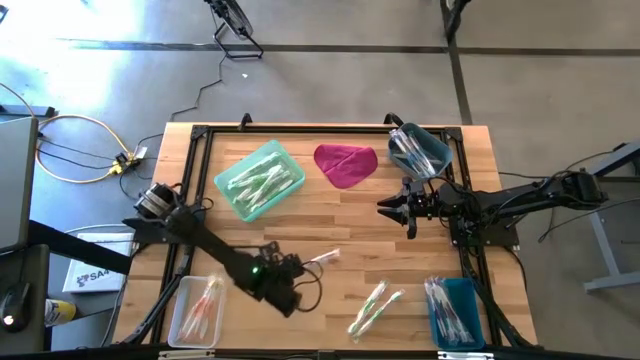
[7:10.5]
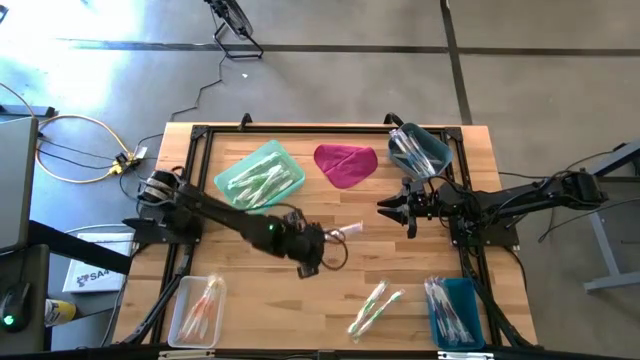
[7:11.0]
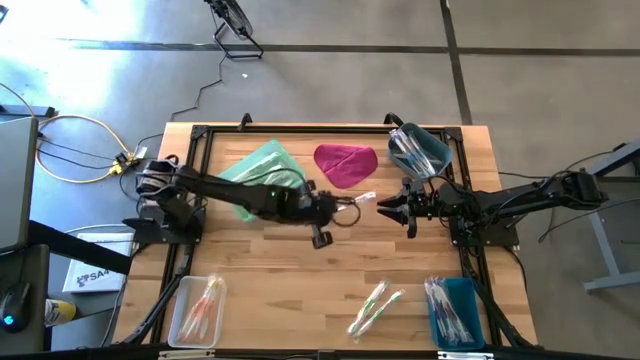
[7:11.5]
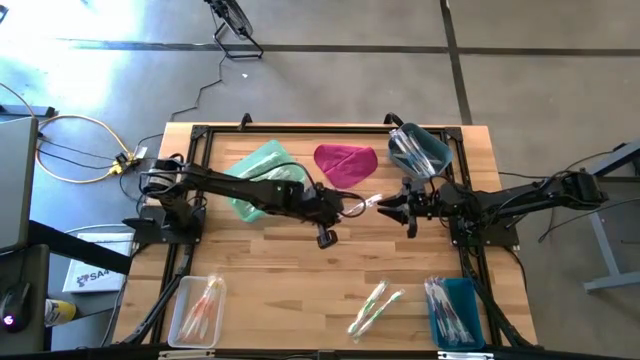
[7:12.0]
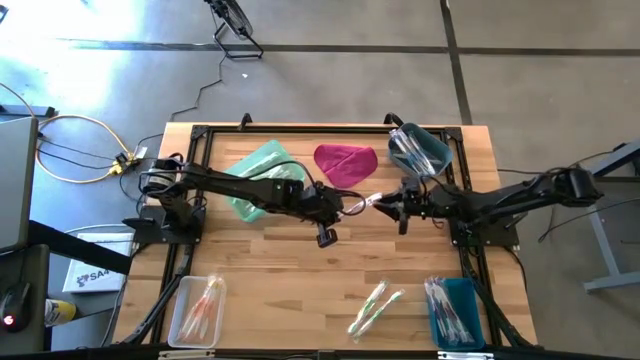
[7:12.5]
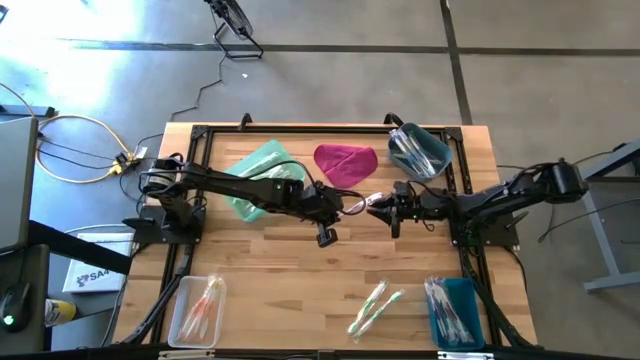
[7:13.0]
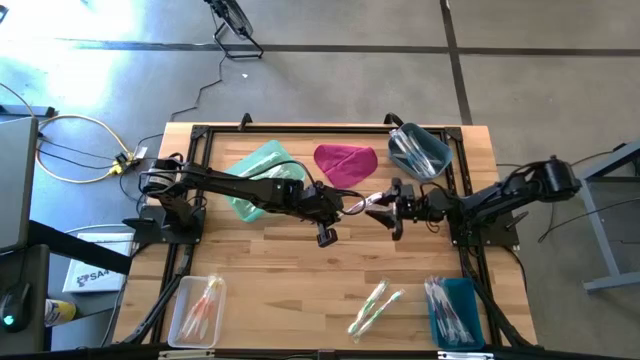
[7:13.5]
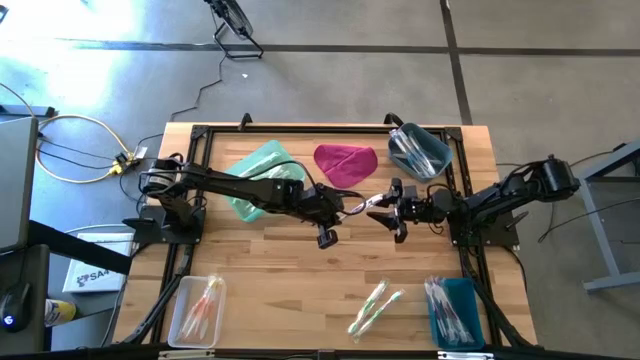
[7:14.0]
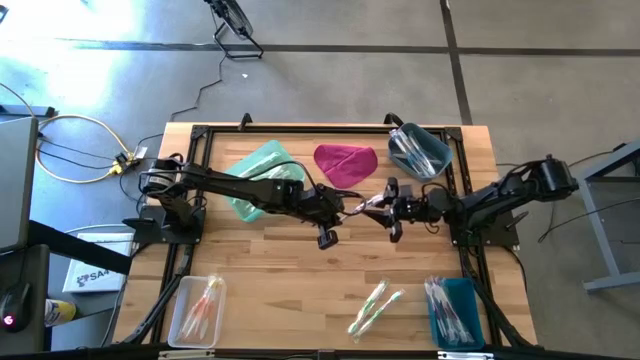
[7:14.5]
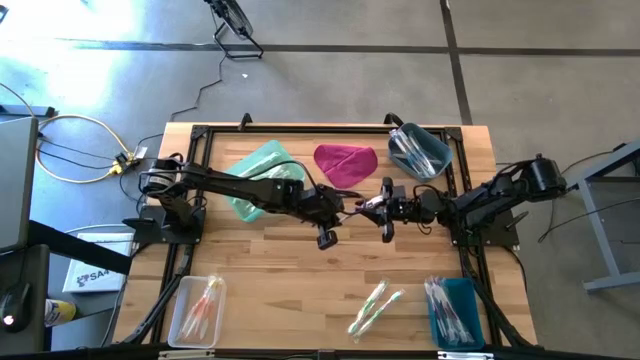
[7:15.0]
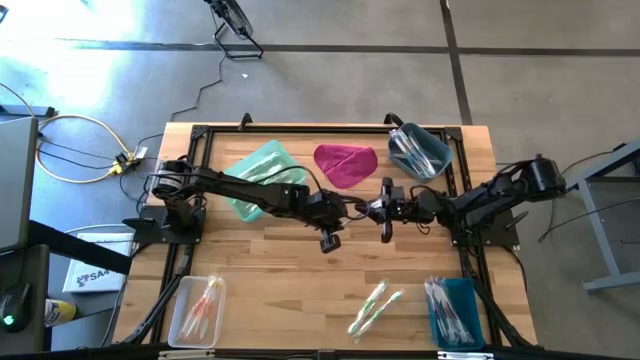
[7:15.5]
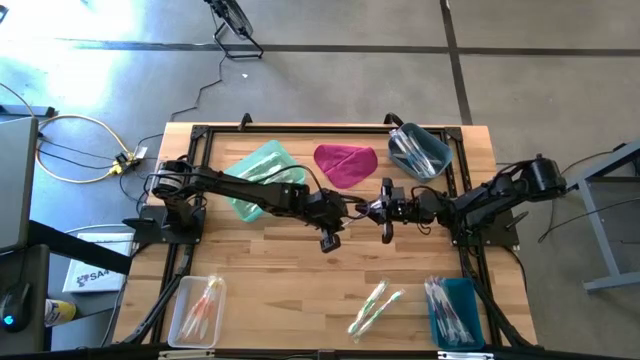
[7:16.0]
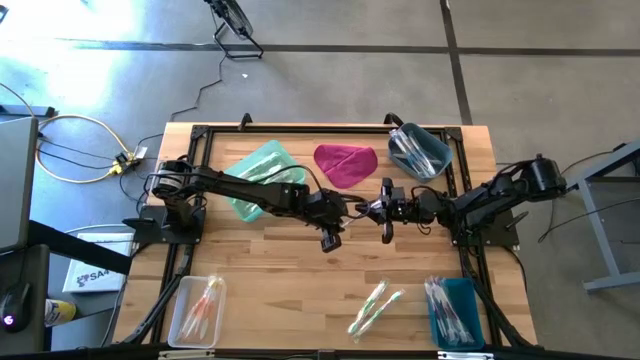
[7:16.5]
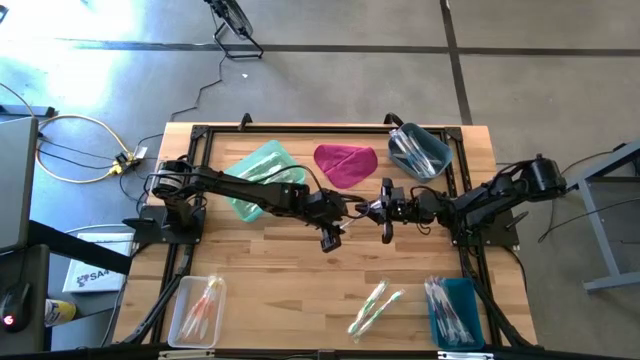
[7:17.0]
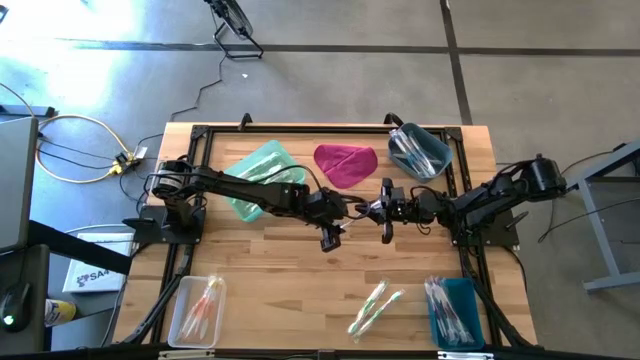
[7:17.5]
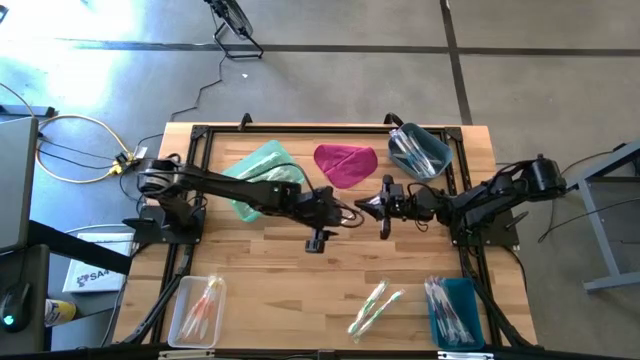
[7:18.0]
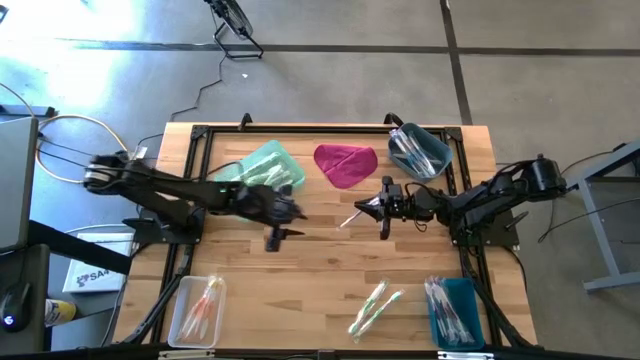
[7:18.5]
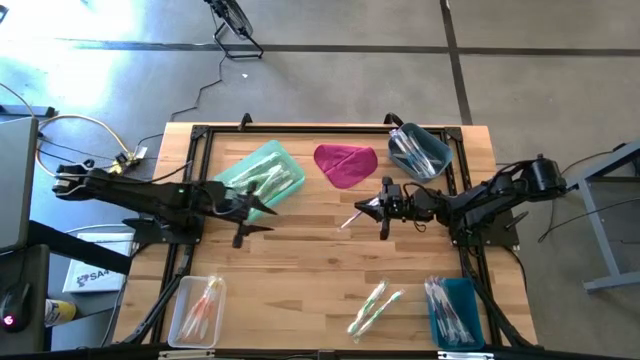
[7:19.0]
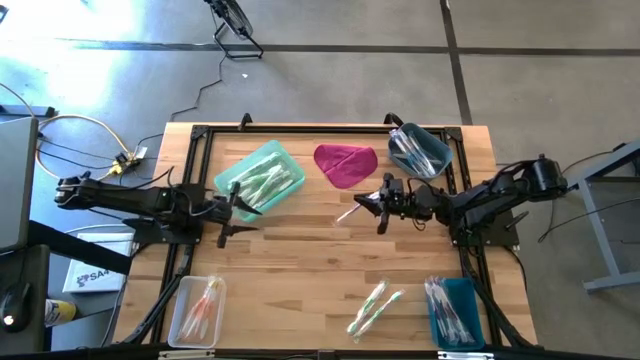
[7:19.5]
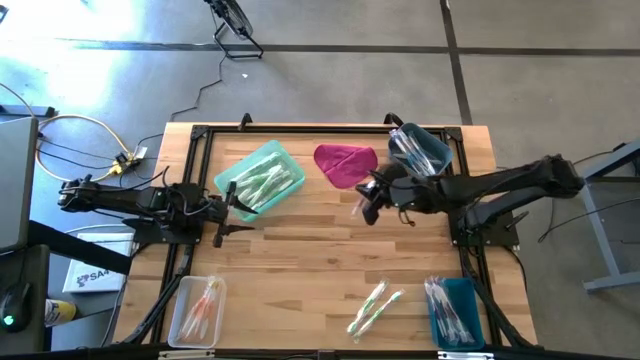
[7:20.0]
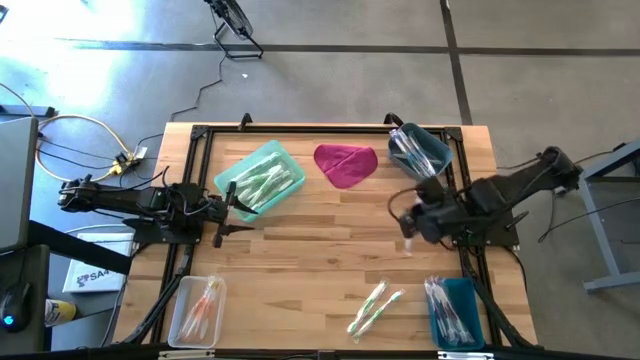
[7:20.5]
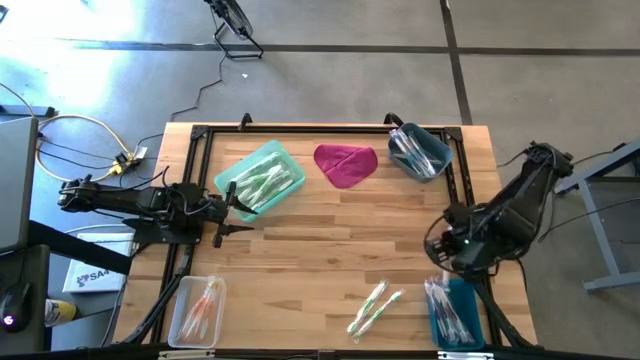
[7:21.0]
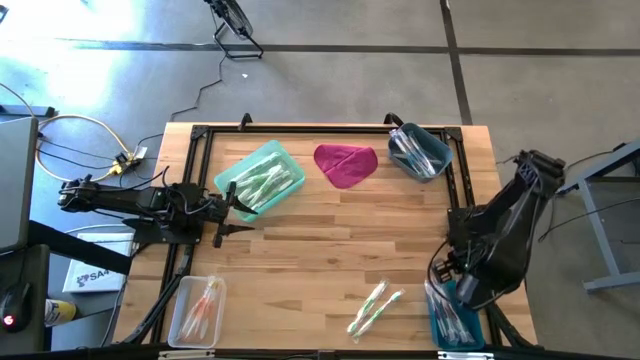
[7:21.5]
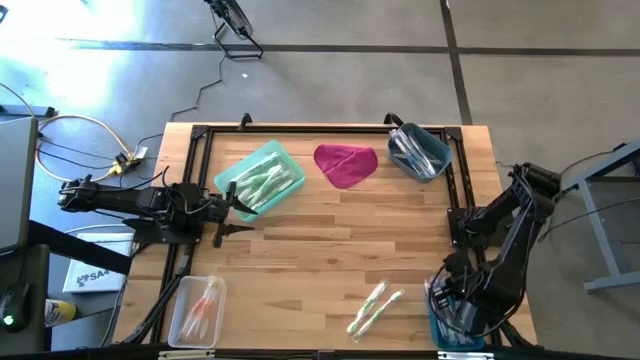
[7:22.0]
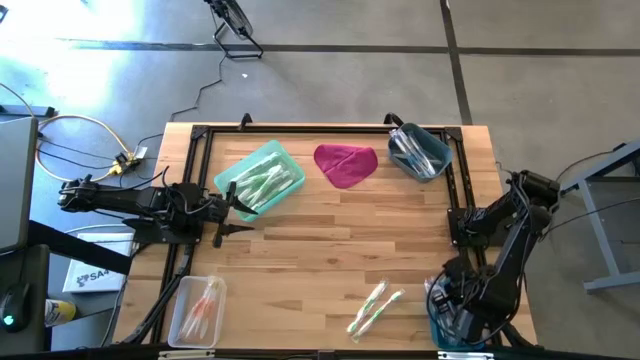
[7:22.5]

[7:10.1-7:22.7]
Task: Pick & Place Toothbrushes
Put the purple toothbrush to the dark blue bin bin

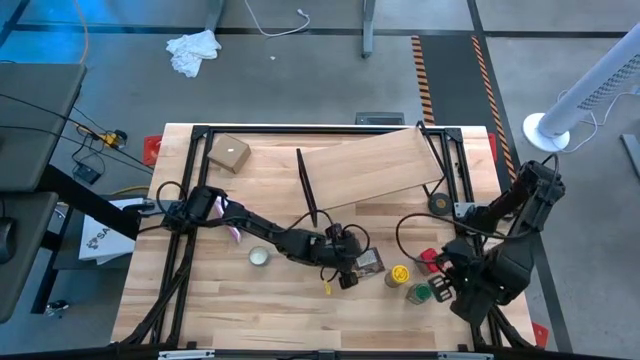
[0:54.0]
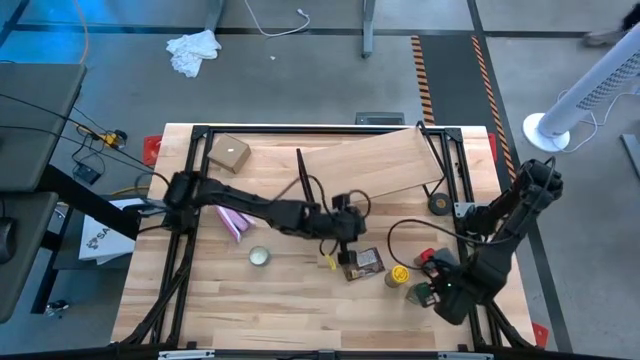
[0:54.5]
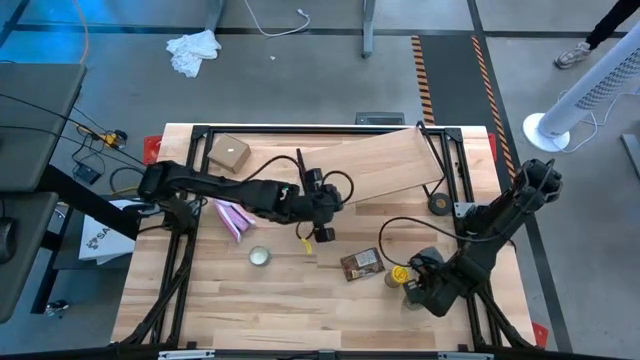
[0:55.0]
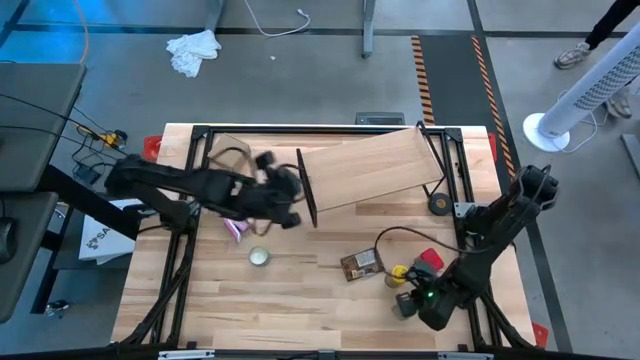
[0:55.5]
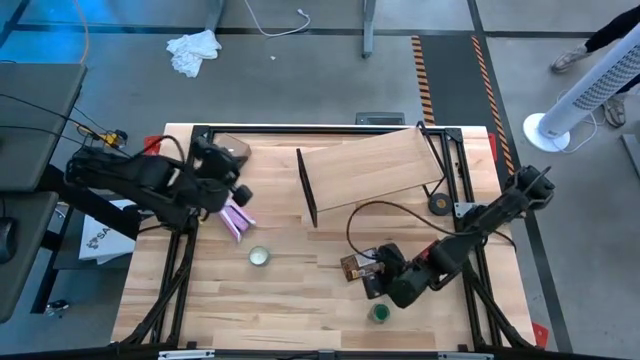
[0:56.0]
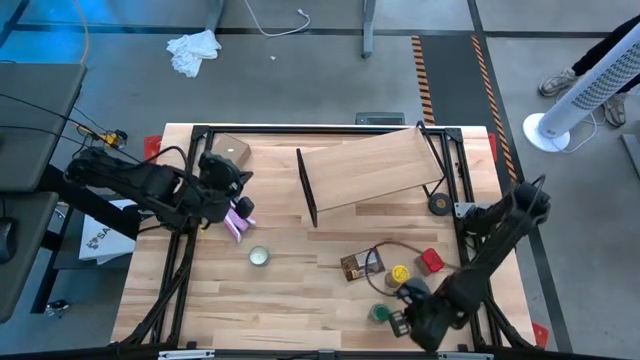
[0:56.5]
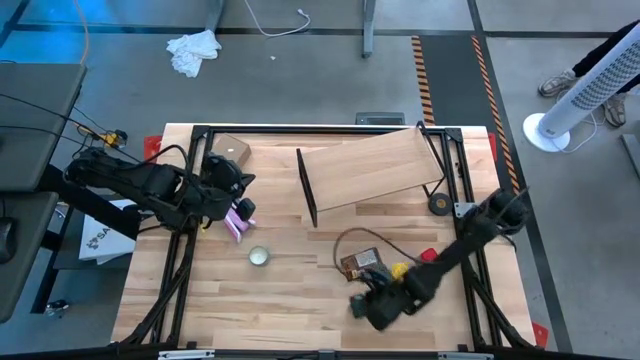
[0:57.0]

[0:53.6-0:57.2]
Task: Shelf spices
Move the green spice bottle to the bottom center of the table

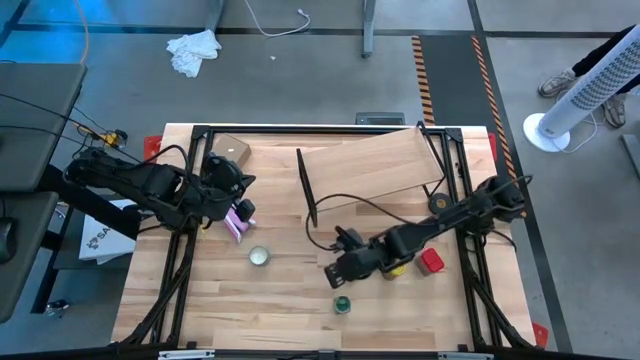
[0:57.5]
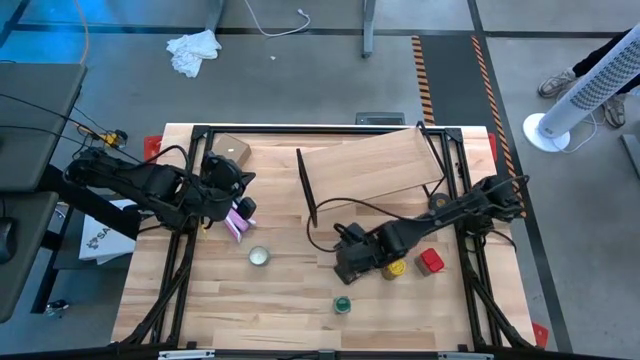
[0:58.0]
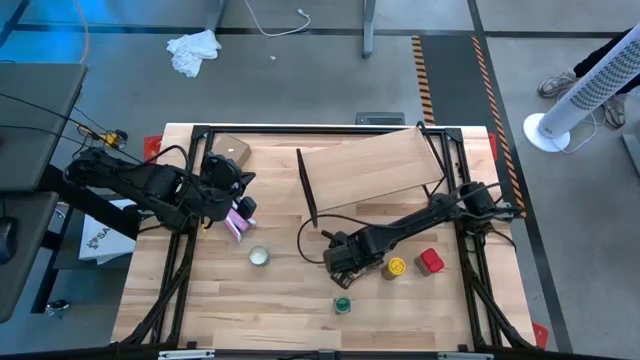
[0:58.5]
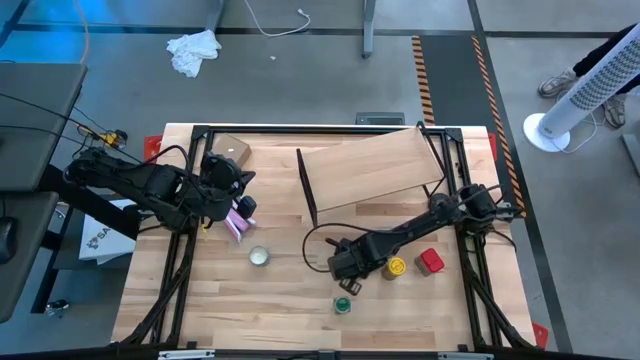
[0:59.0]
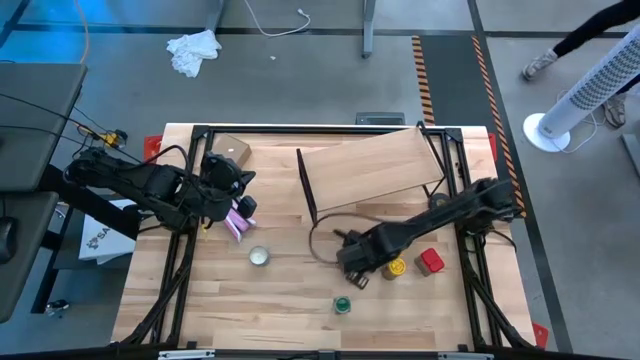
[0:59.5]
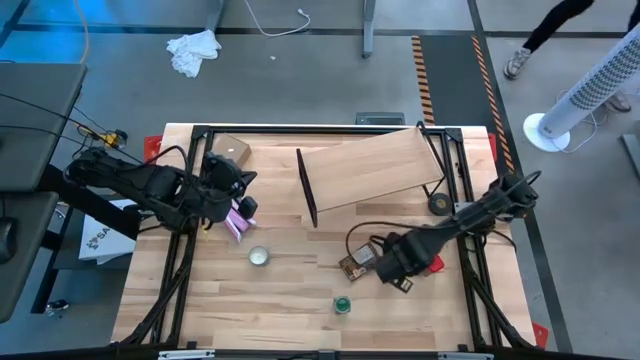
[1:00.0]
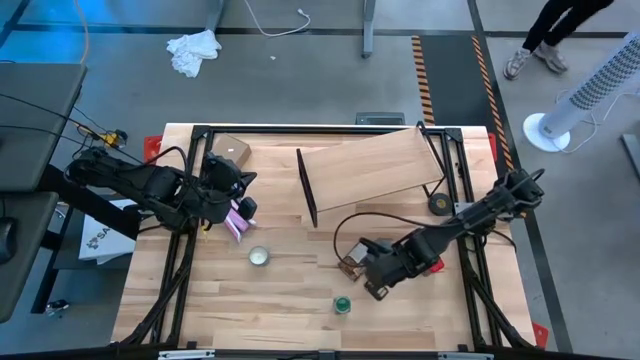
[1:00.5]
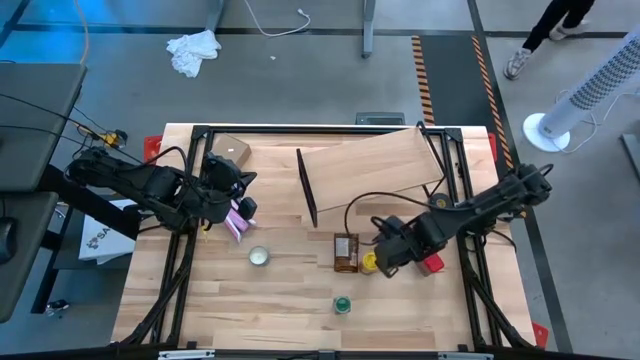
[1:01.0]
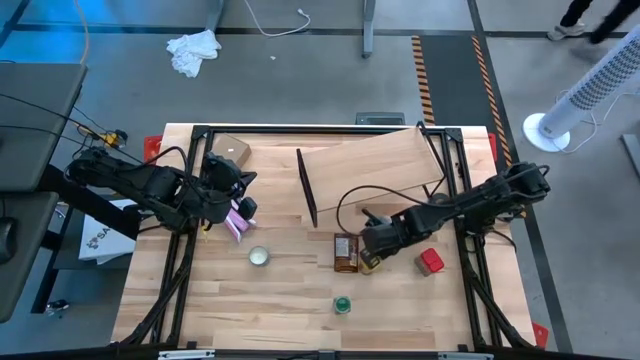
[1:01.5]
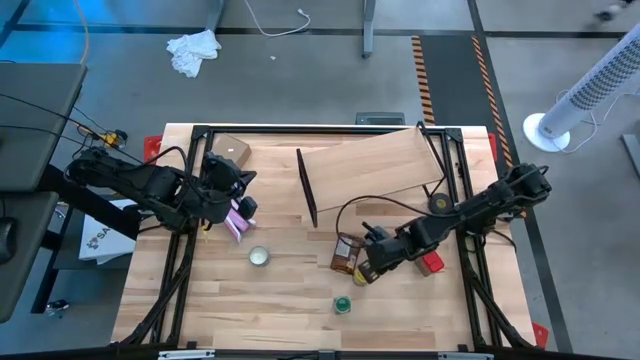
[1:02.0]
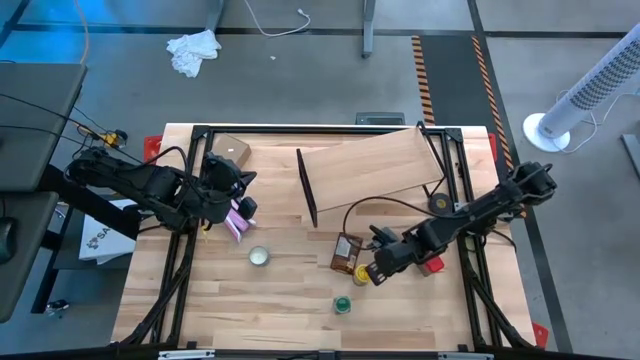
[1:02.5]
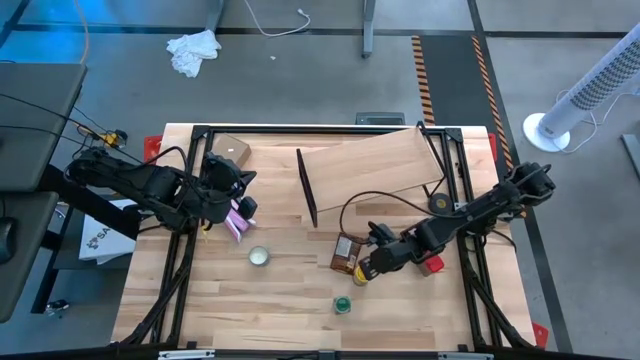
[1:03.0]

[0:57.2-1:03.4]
Move the yellow spice bottle to the bottom center of the table

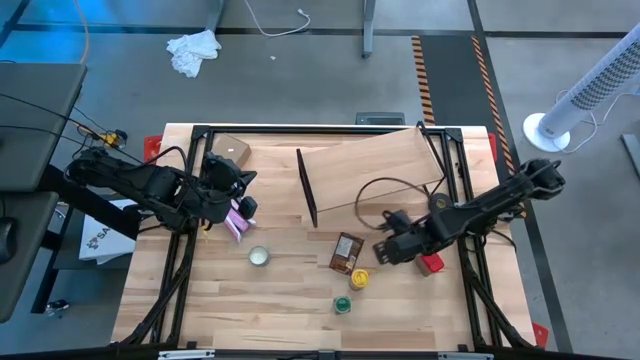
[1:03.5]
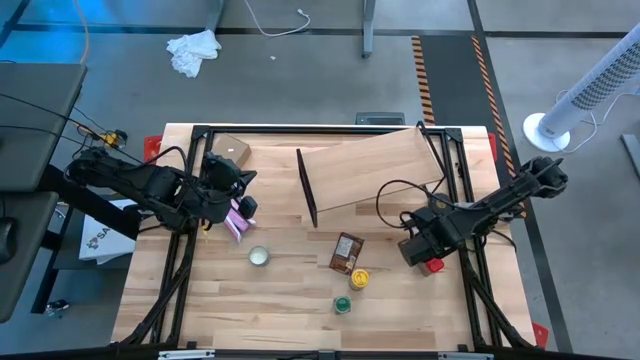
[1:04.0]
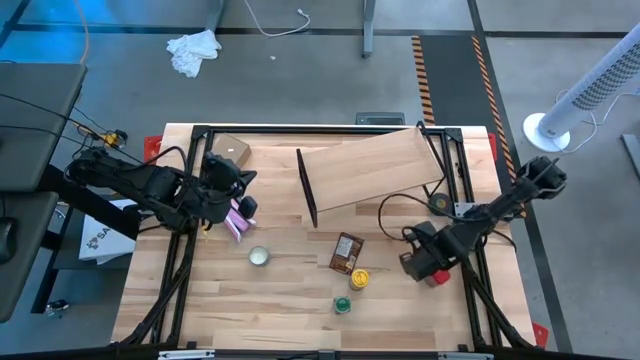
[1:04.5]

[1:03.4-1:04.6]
Adjust the red spice can
